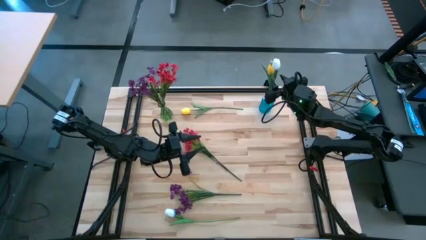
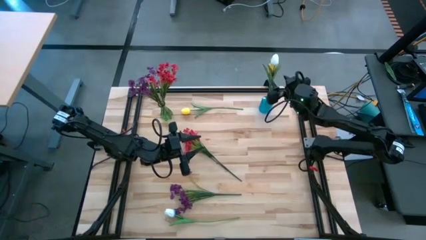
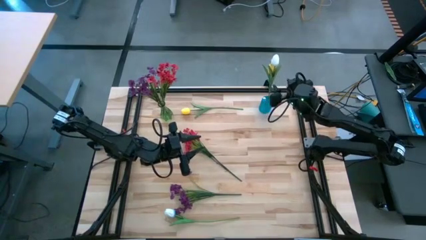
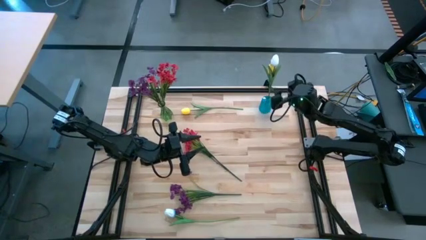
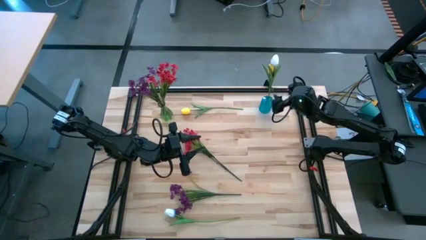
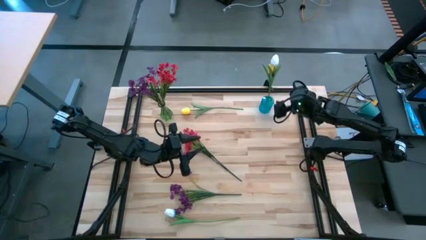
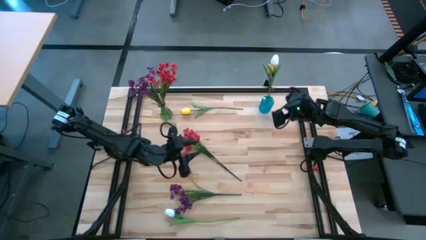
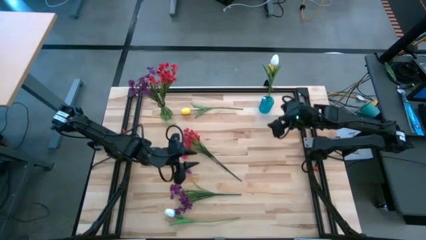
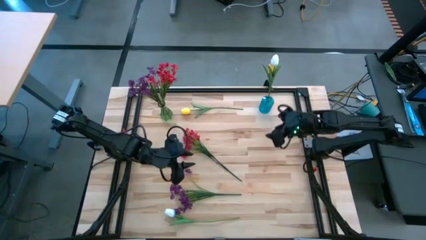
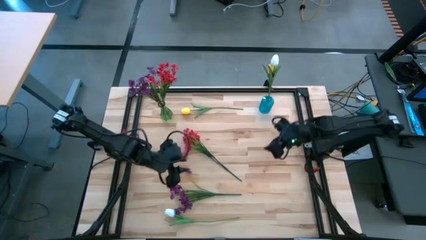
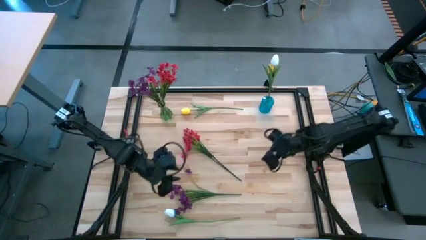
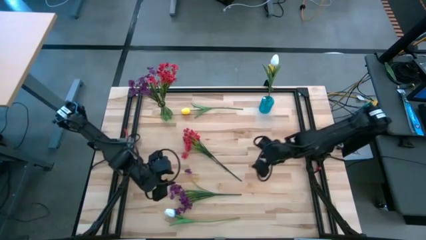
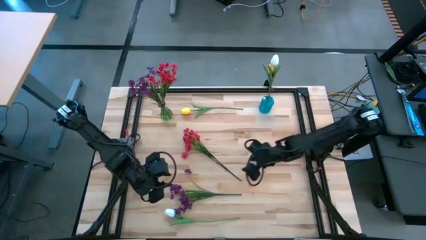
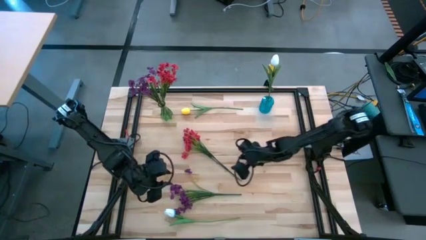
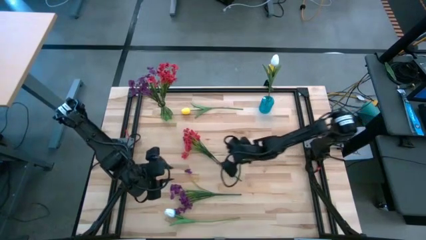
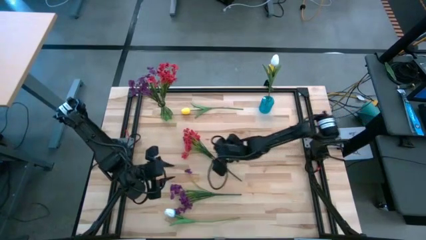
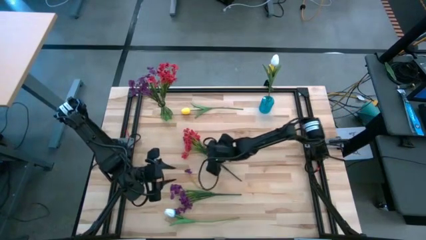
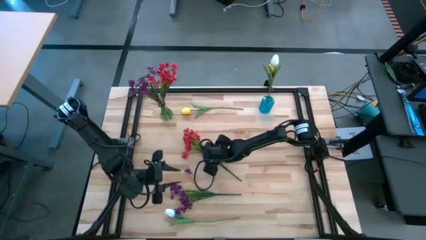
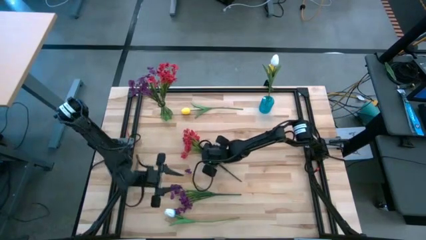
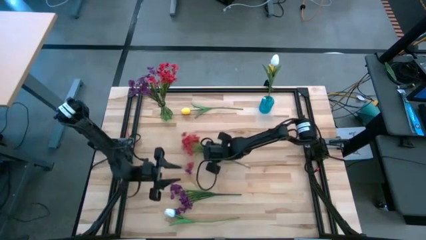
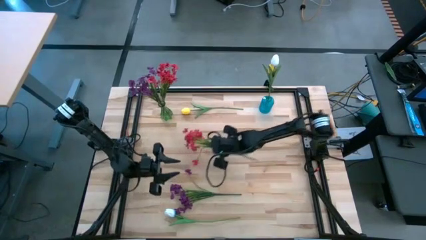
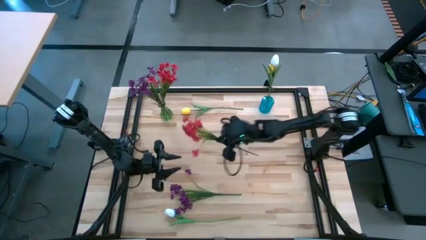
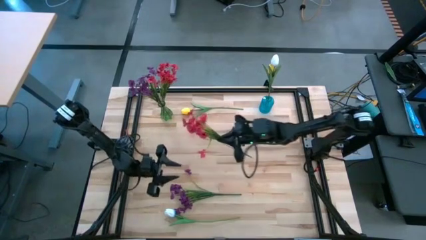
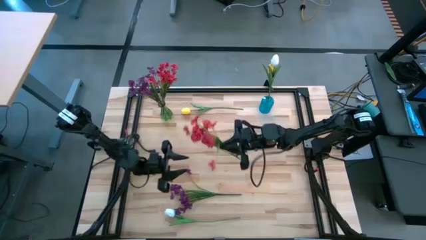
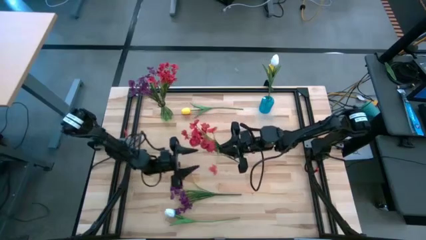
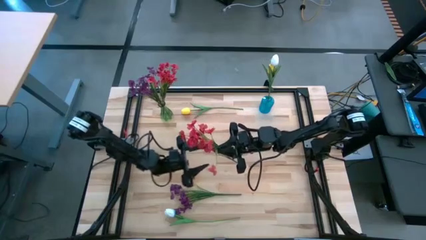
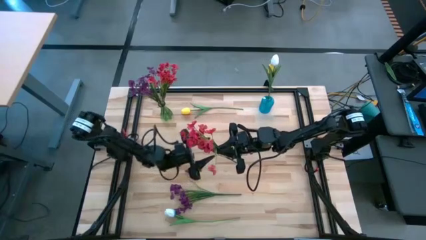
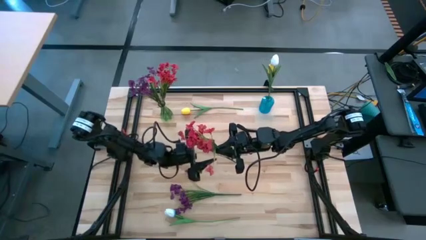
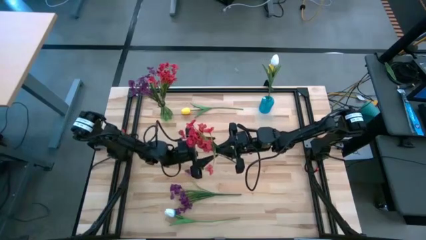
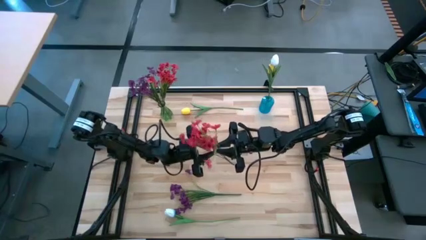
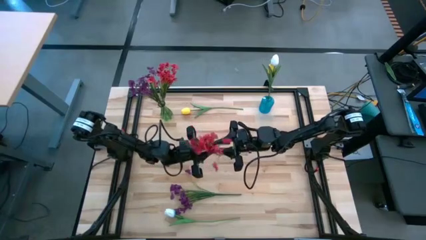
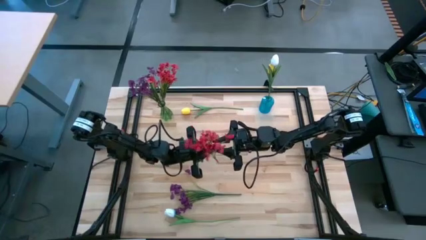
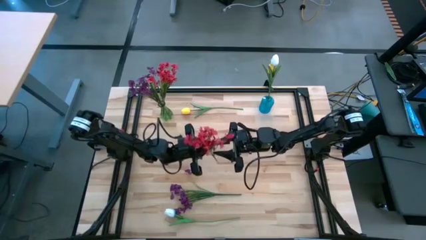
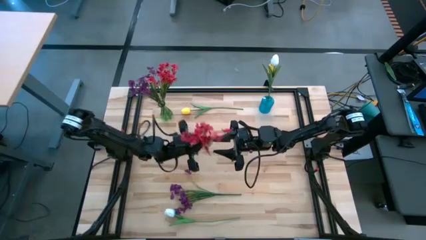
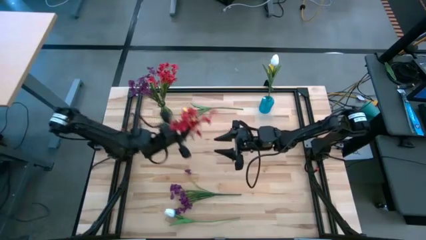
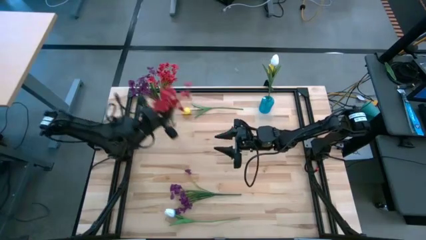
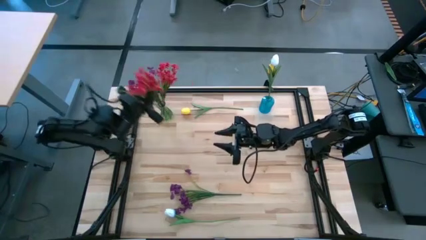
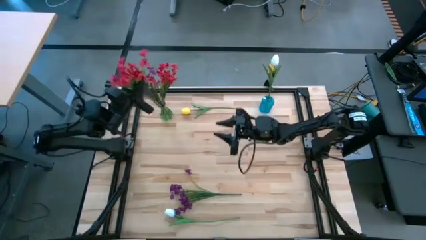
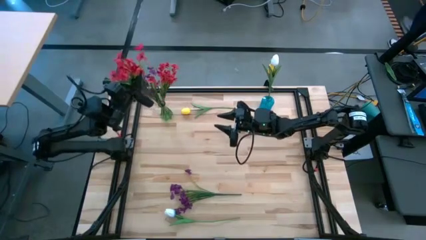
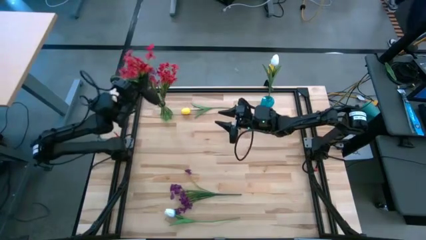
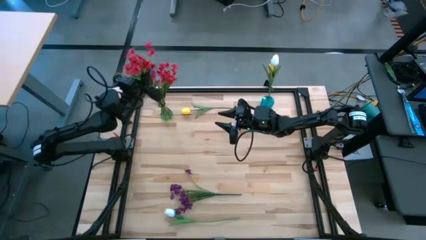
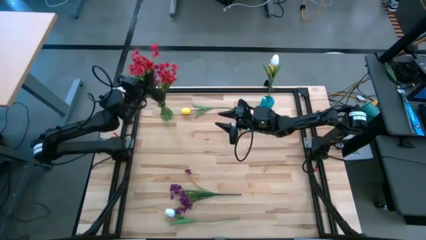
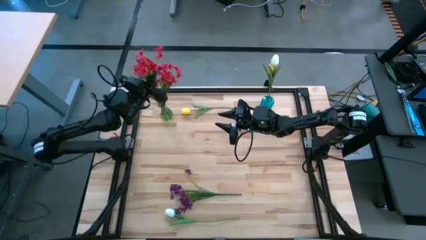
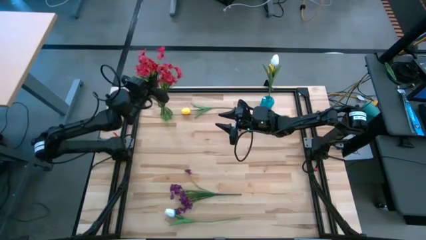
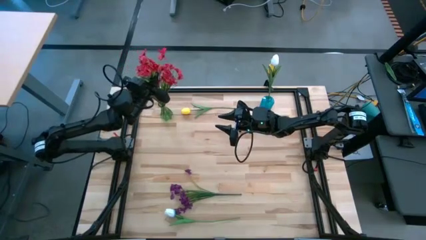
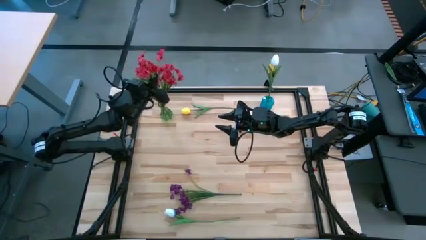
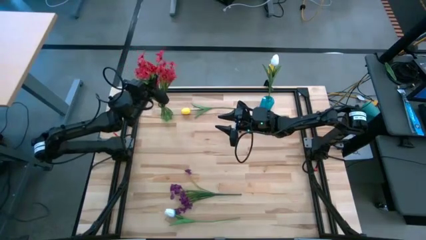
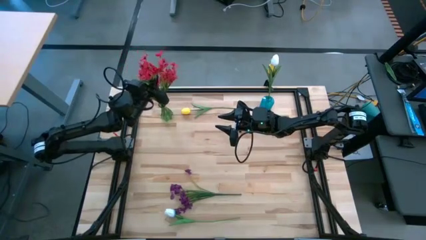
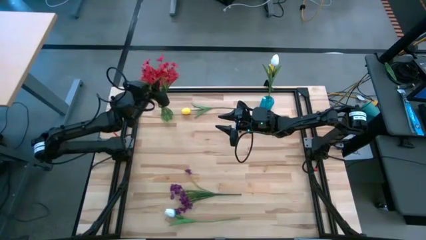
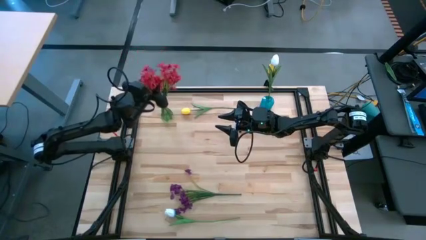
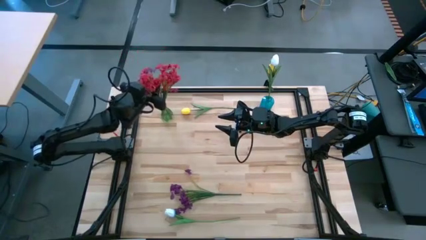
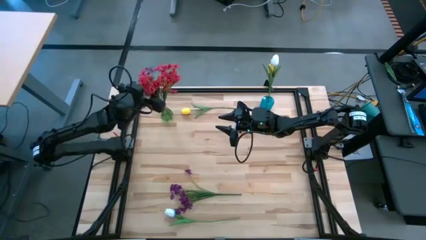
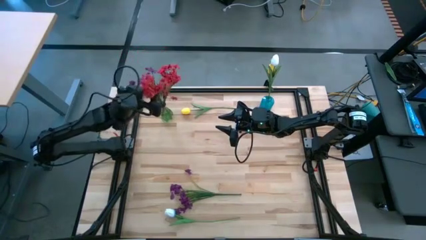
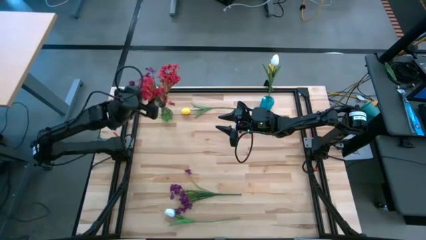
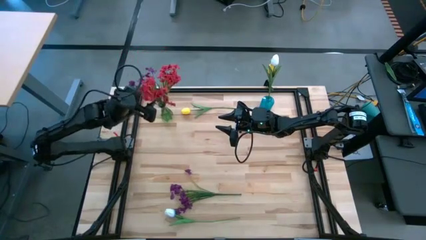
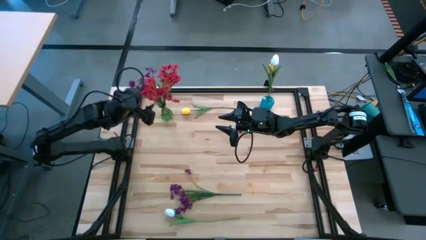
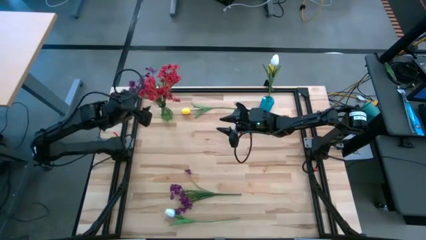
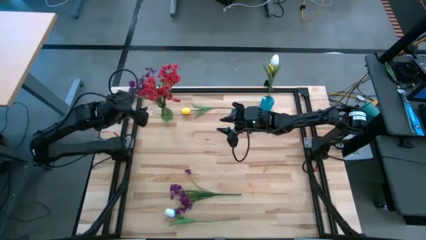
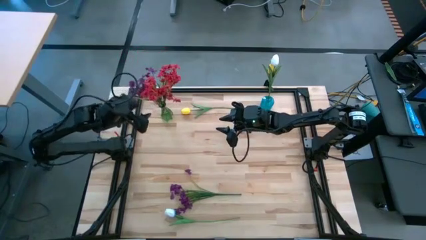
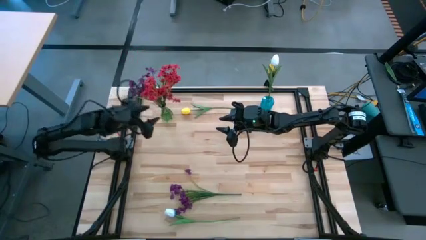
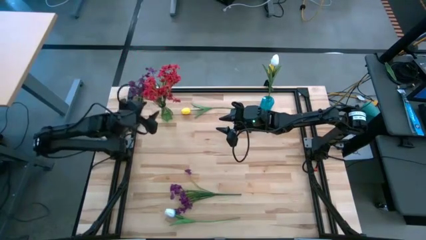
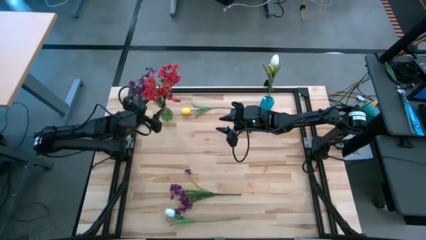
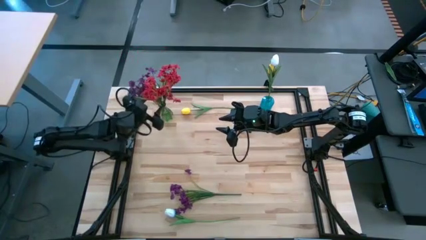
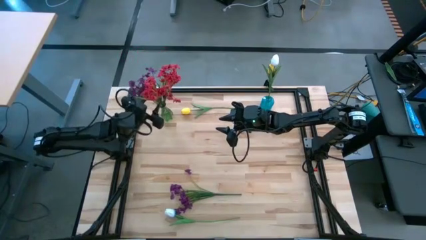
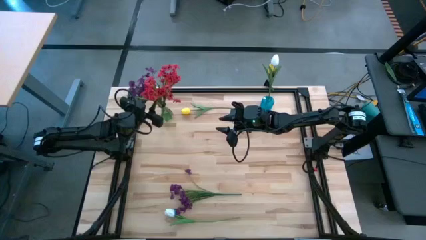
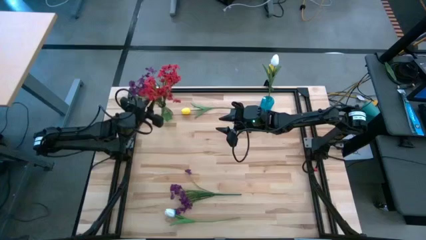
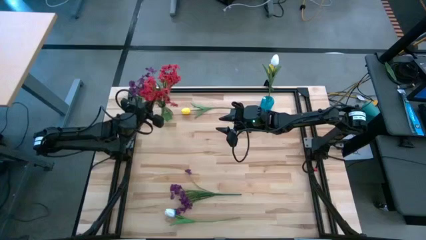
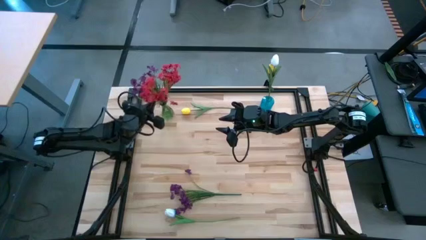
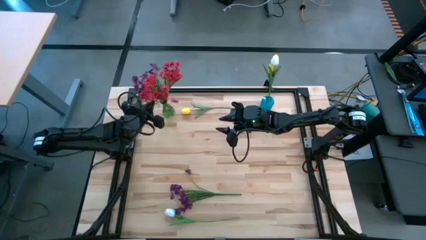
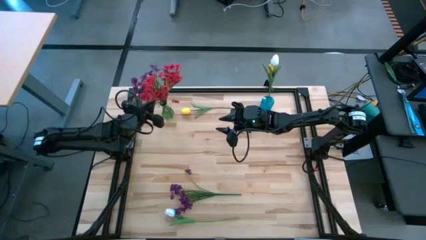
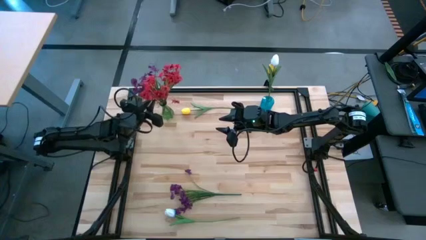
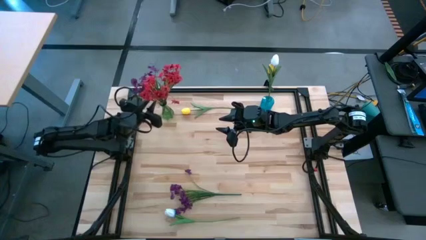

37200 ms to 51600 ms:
Task: Sort flowers into vase by color
Put the red flowers into the green vase
